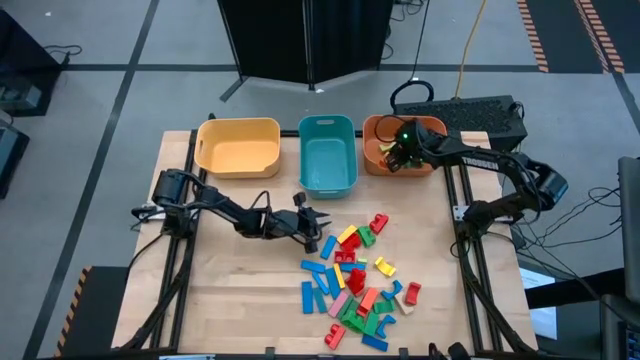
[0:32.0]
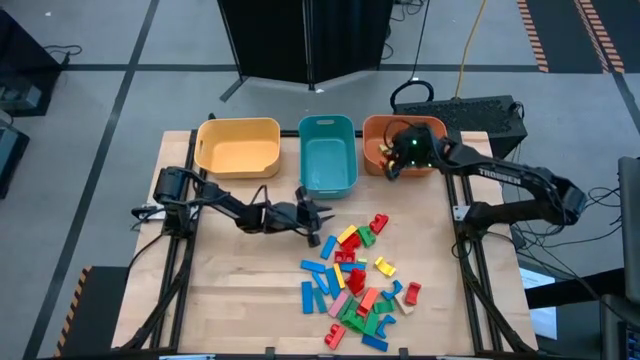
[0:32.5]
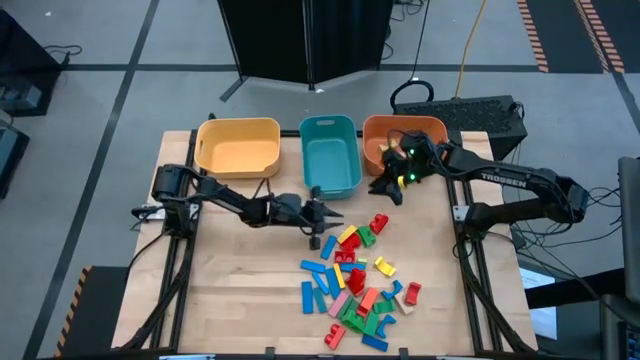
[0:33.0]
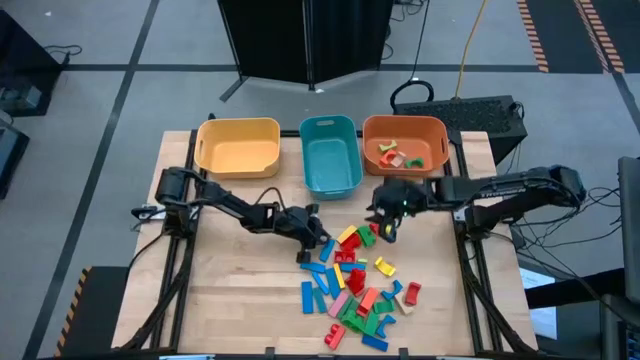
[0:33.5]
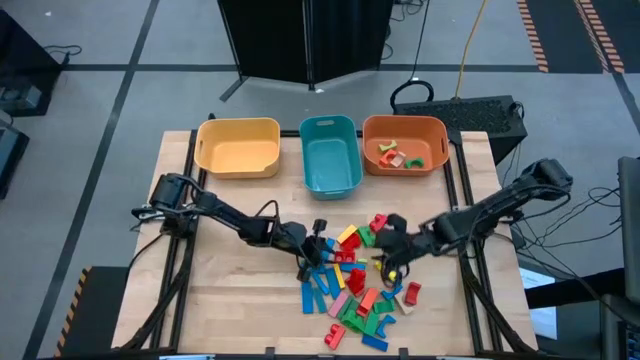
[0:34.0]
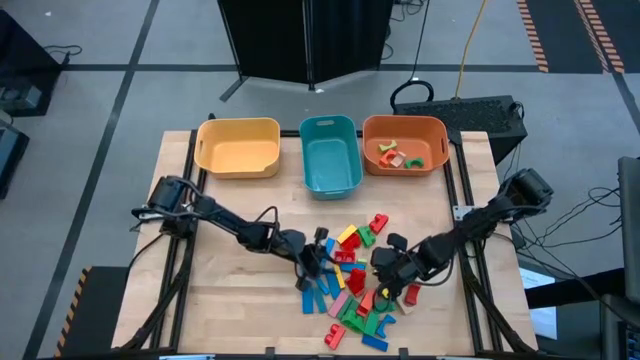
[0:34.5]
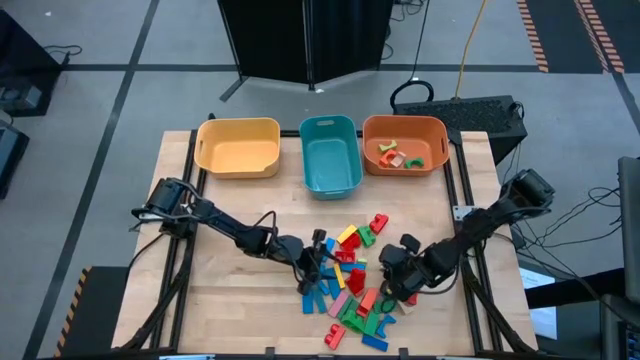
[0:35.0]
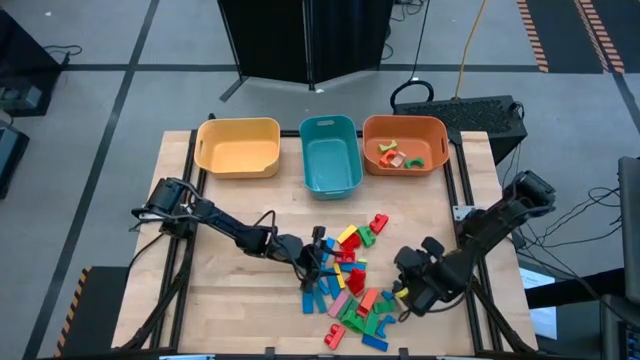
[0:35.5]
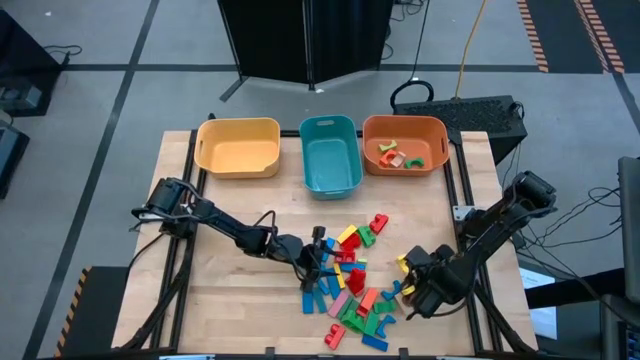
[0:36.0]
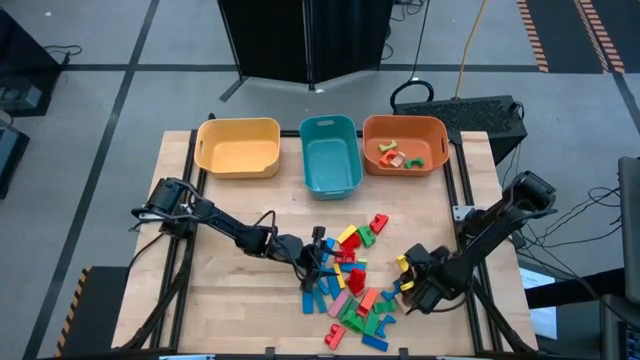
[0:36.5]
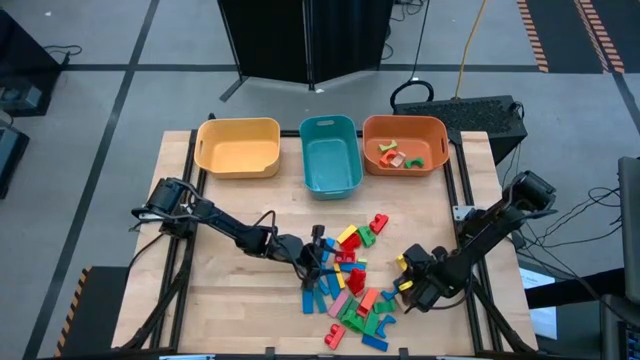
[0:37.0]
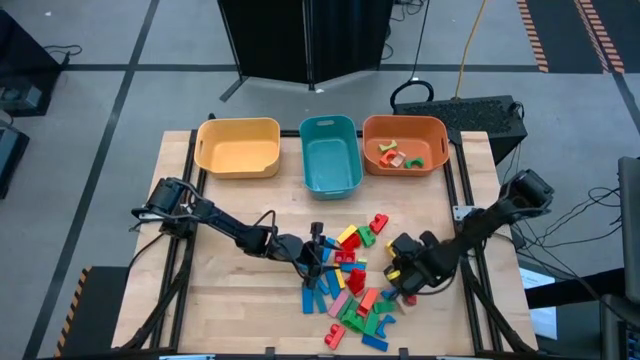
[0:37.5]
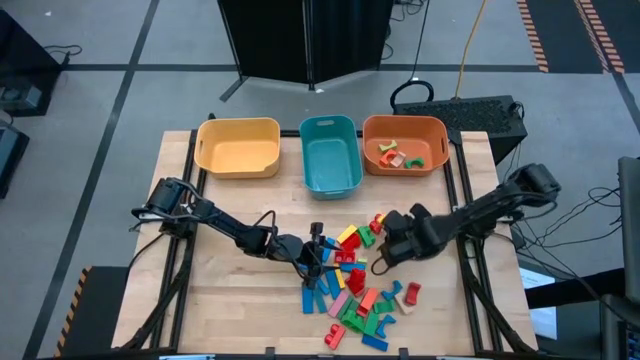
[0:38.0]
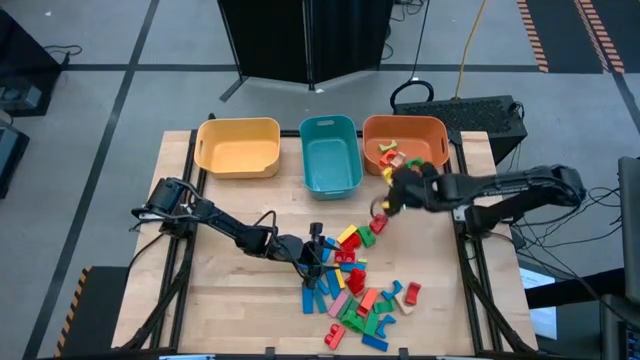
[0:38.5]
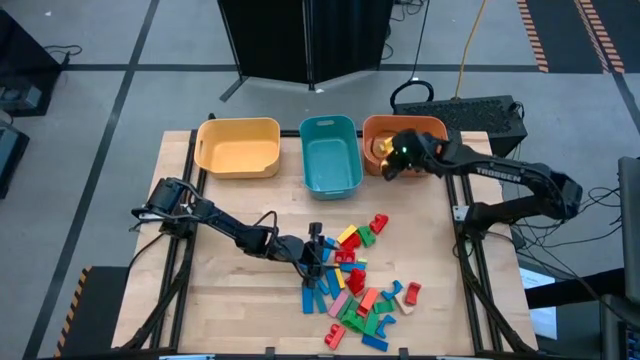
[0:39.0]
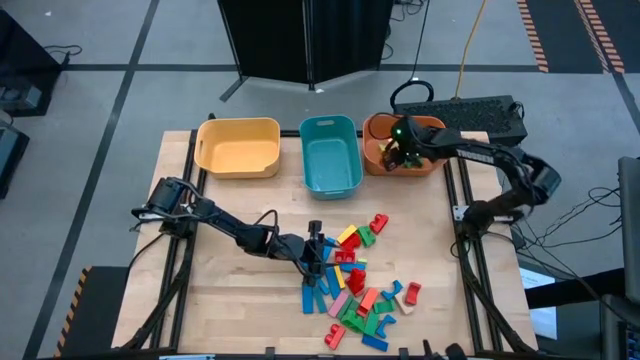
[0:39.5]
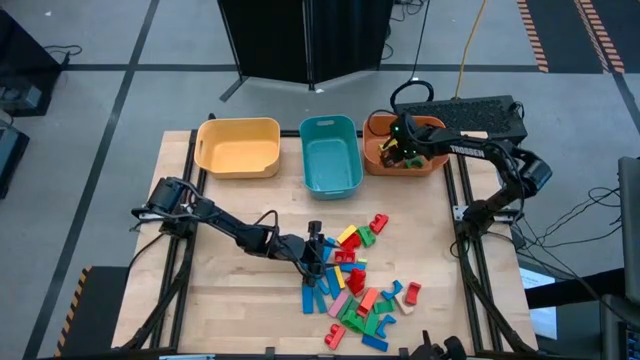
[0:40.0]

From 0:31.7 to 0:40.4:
Task: Sort blocks by size
Put the yellow arch block into the orange bin

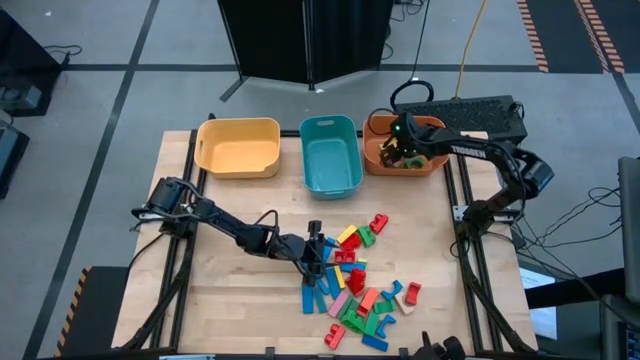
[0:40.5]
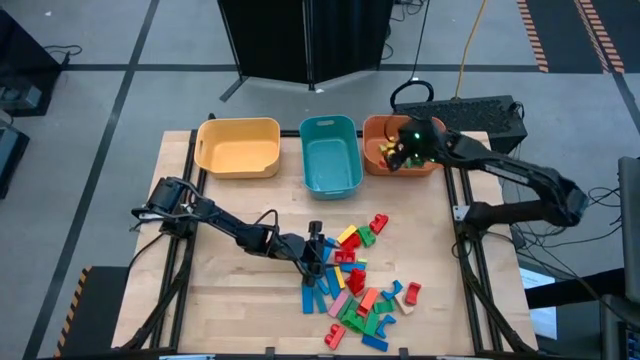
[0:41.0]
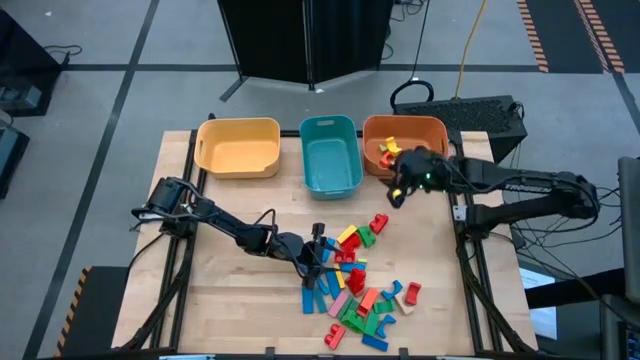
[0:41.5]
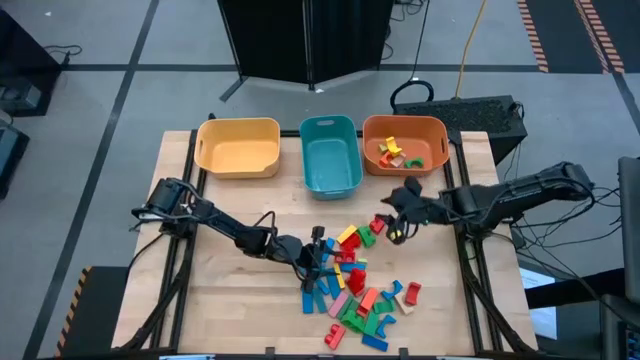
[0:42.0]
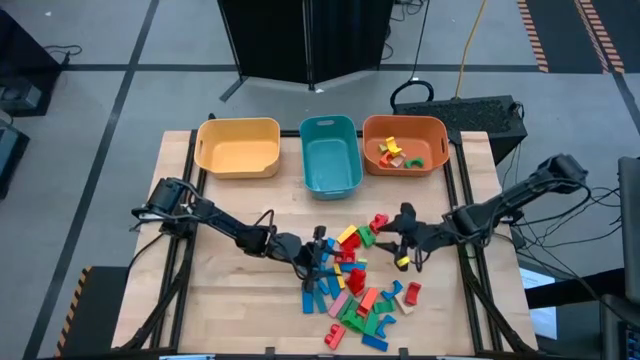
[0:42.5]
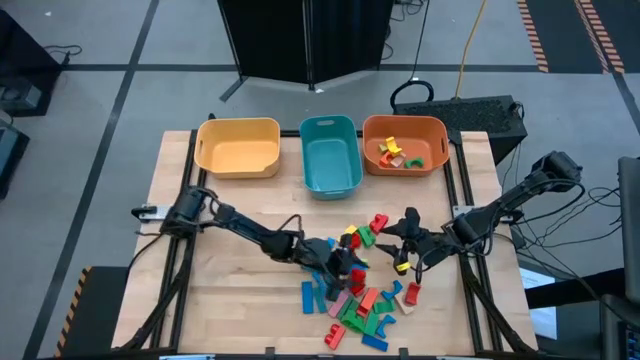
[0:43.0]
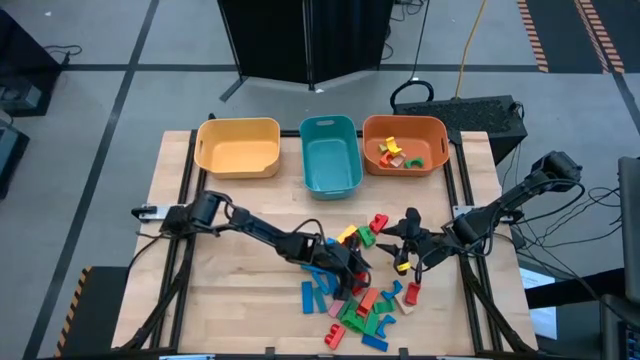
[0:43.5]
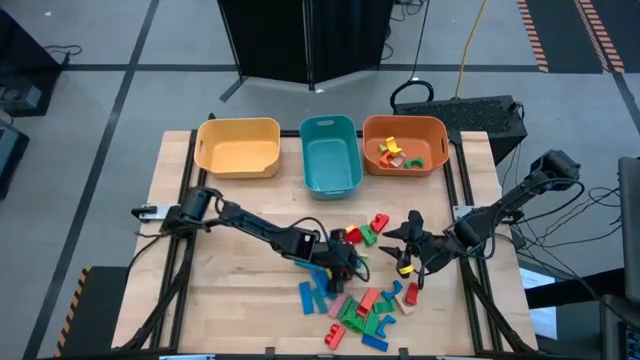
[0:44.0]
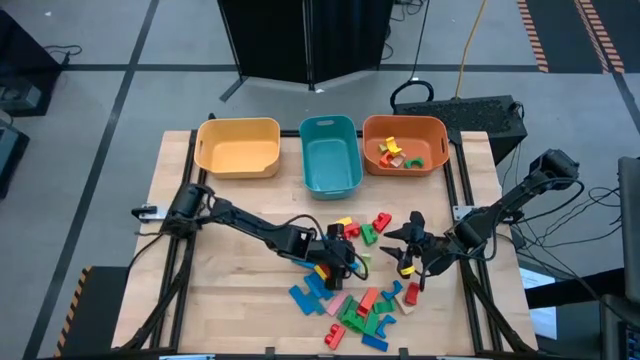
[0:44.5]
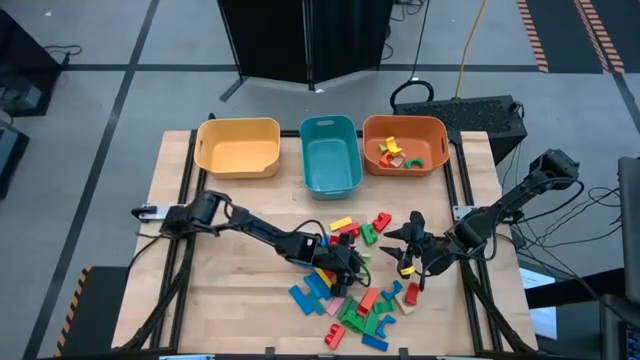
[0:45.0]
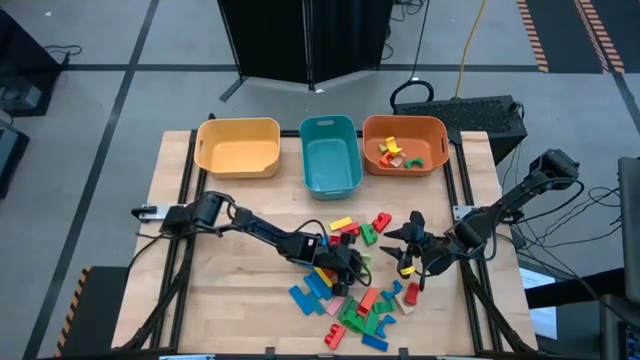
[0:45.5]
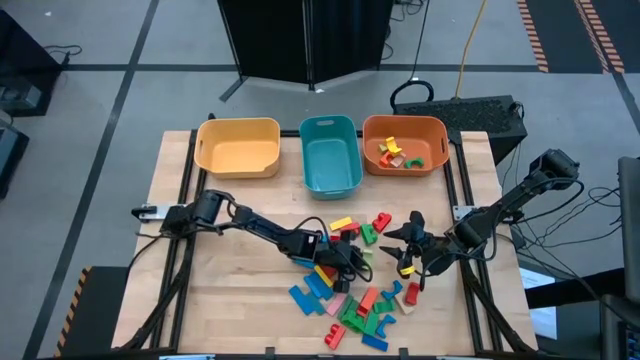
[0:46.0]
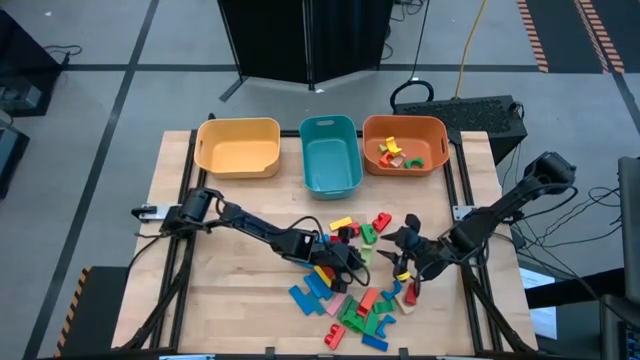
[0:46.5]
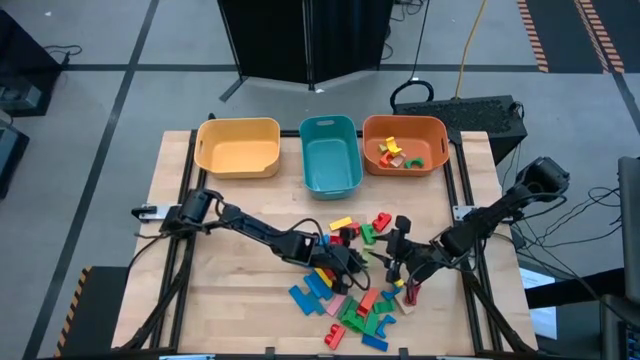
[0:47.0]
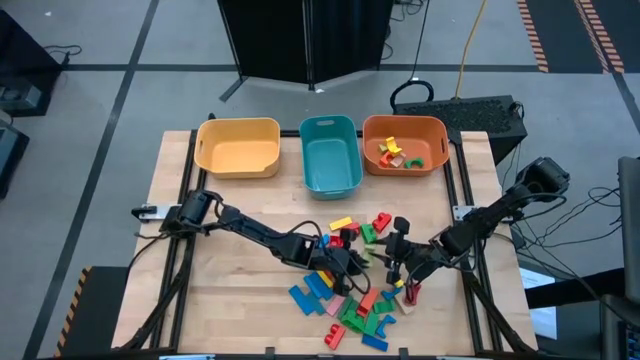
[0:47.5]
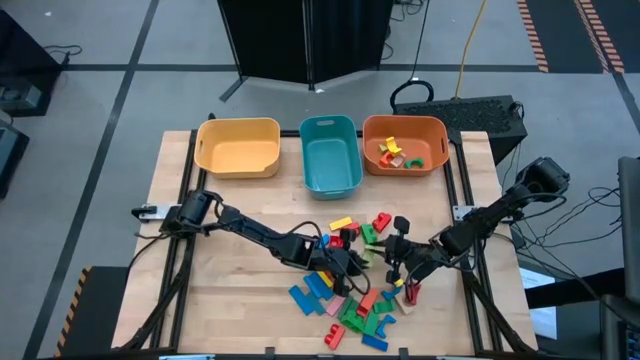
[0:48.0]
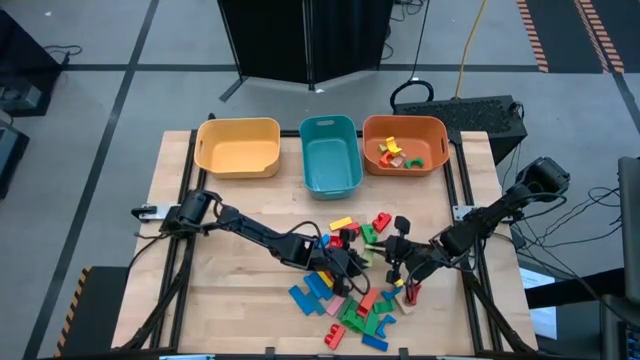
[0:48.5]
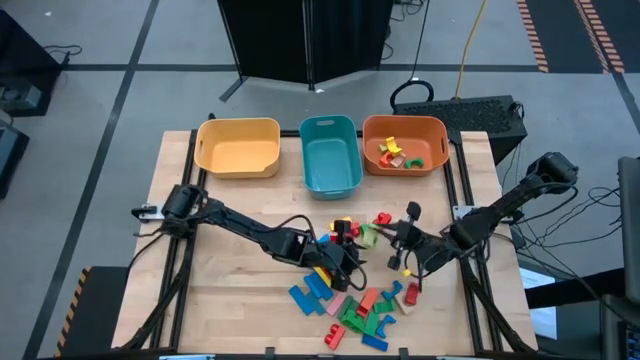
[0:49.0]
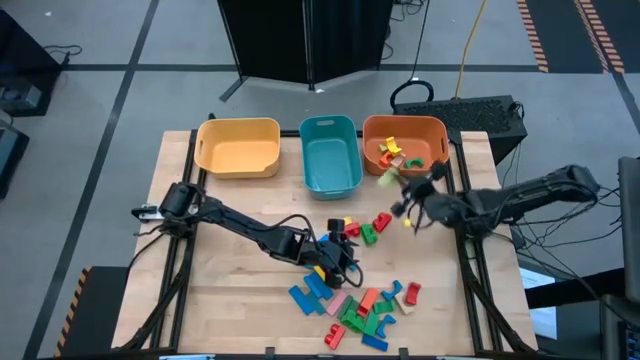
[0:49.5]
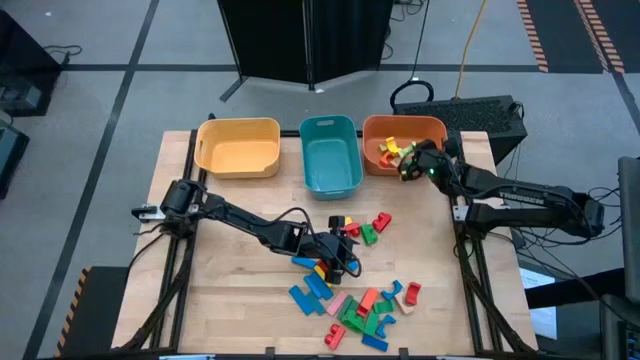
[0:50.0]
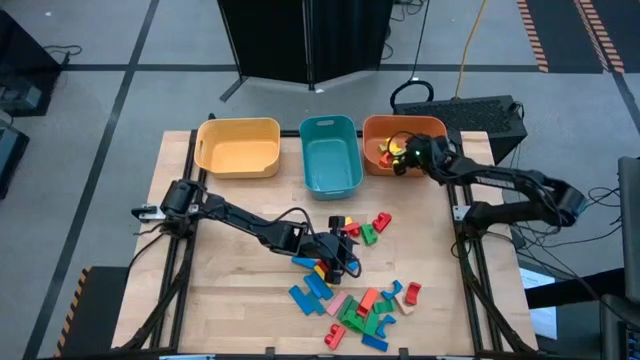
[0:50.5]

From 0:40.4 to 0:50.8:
Put the light green arch block into the orange bin

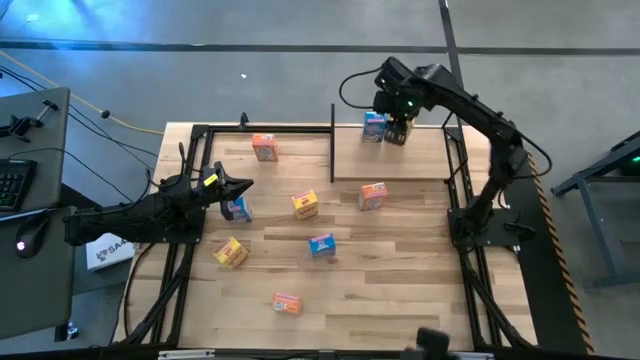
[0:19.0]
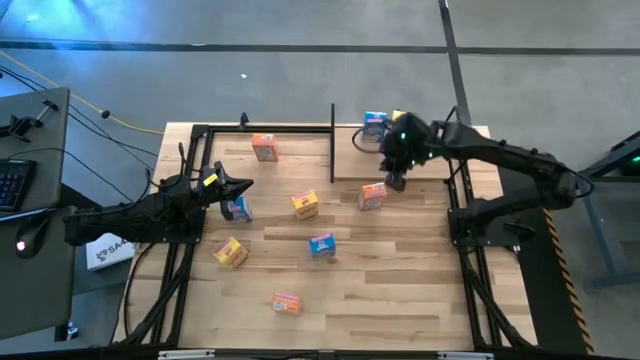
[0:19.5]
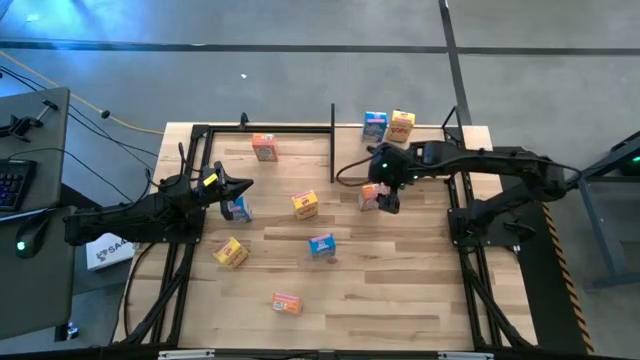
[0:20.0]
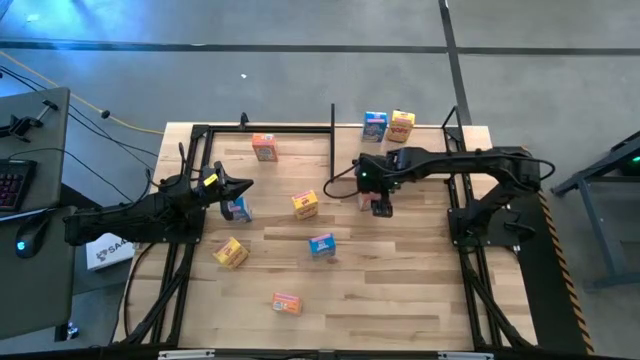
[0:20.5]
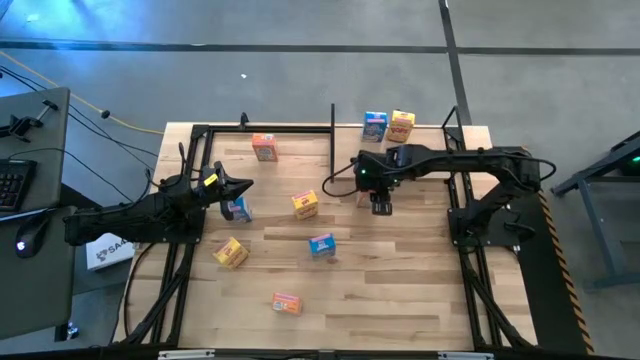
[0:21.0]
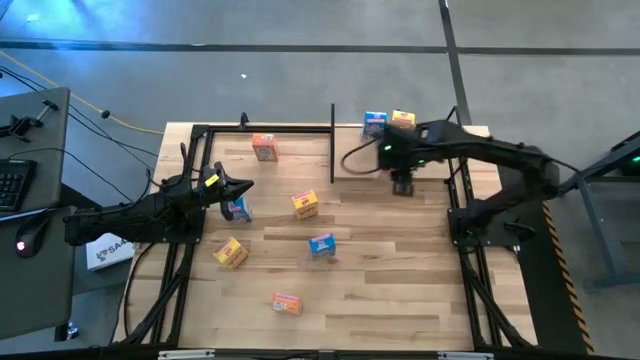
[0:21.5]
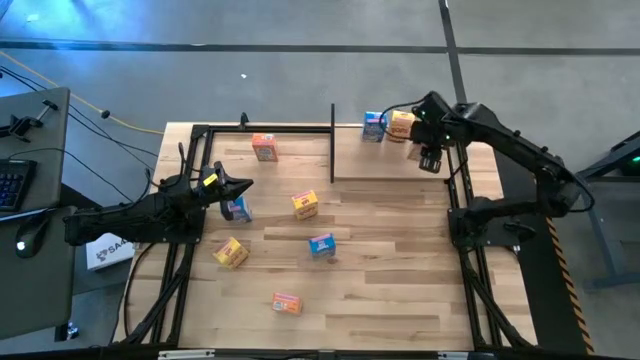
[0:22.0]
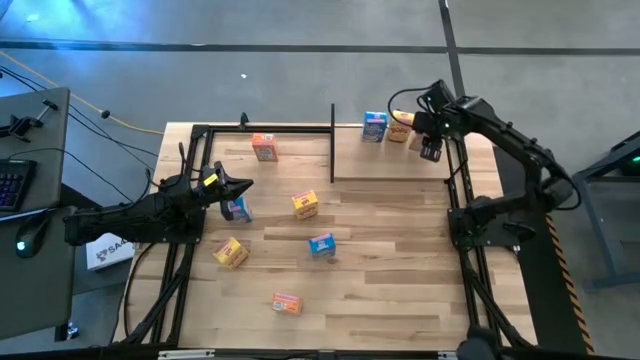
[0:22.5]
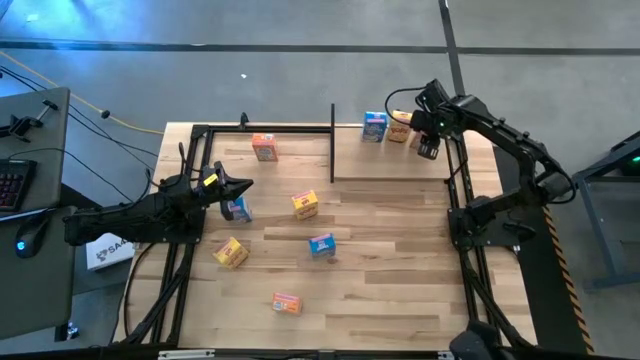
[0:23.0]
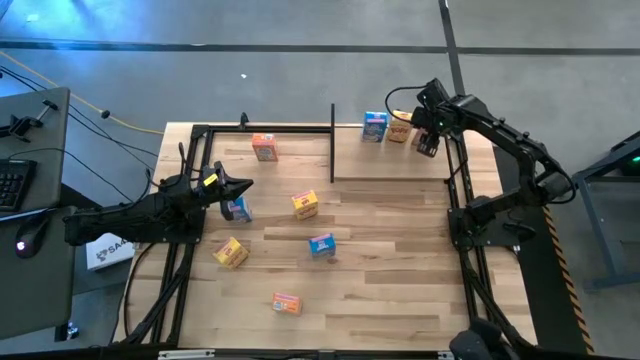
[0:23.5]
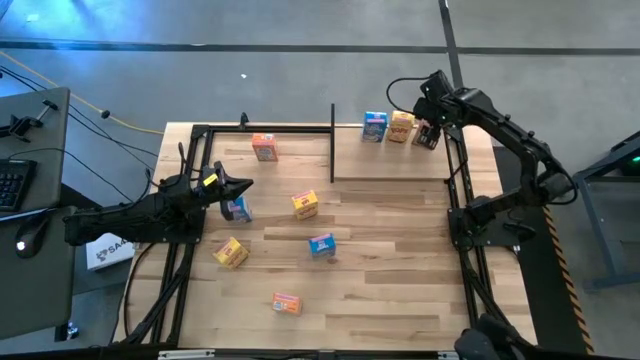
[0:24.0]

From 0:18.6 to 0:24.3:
Task: Stack cereal on shelf
Put the middle right orange cereal box on the shelf aligned with the other yellow cereal box
